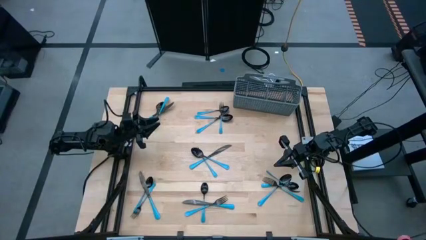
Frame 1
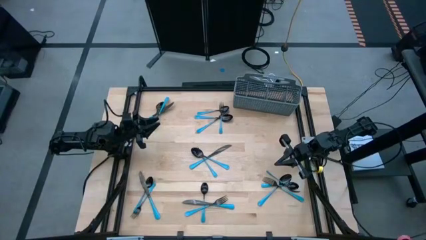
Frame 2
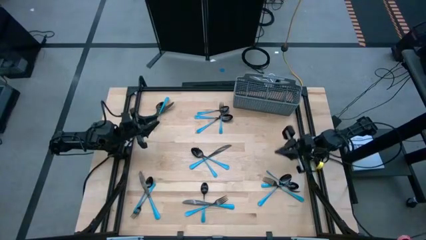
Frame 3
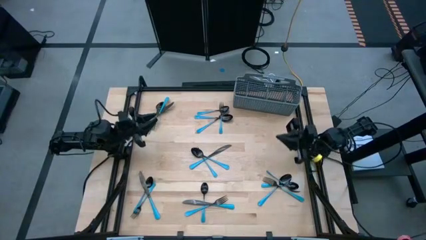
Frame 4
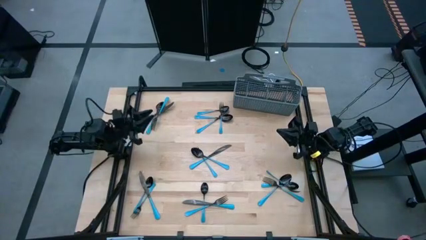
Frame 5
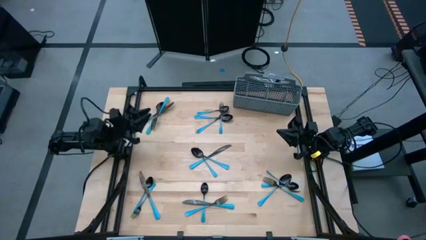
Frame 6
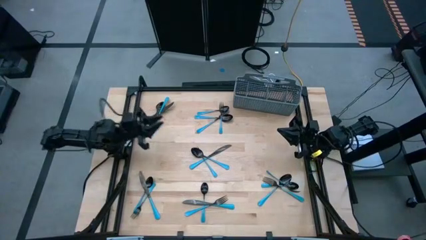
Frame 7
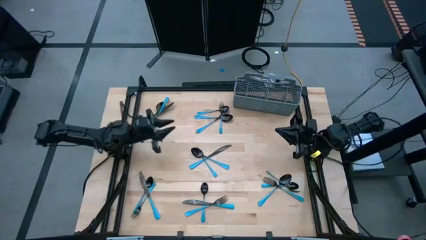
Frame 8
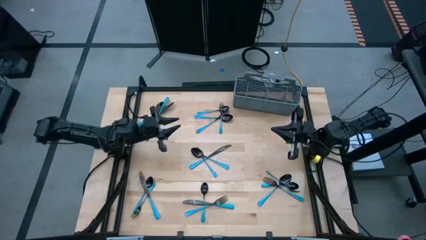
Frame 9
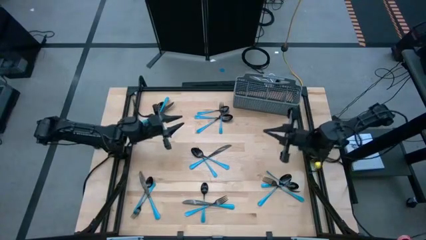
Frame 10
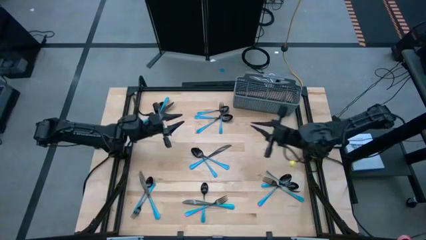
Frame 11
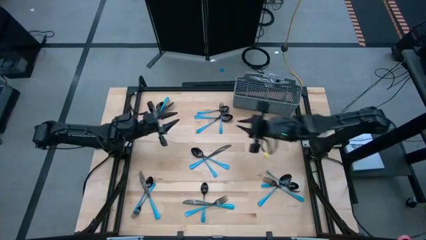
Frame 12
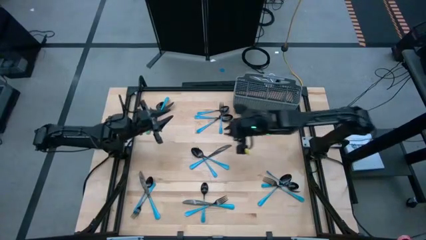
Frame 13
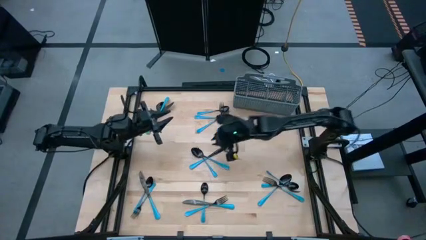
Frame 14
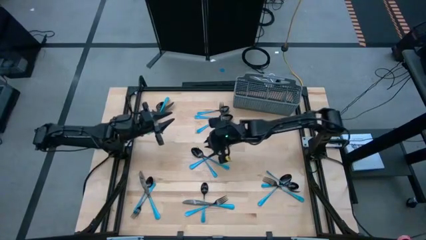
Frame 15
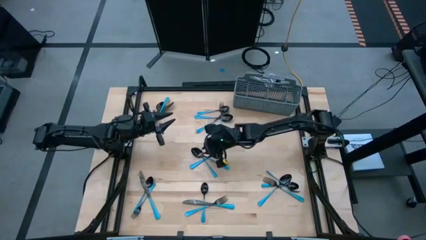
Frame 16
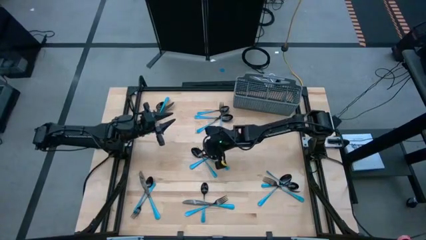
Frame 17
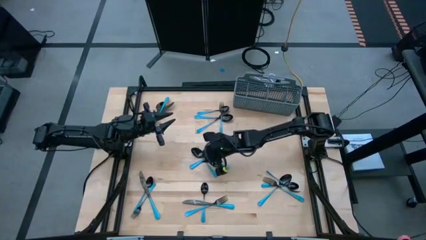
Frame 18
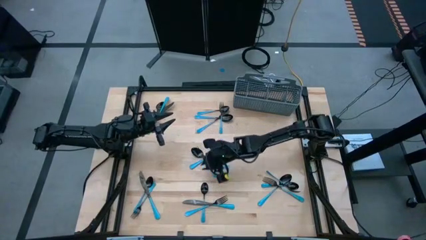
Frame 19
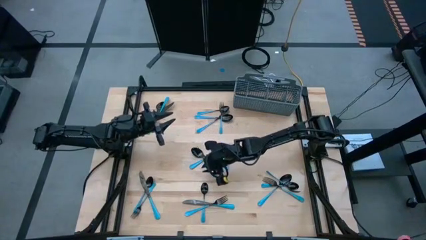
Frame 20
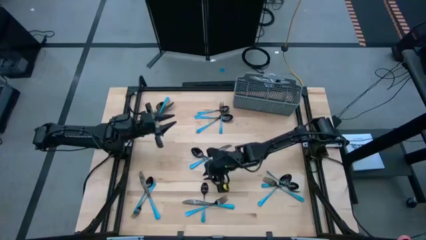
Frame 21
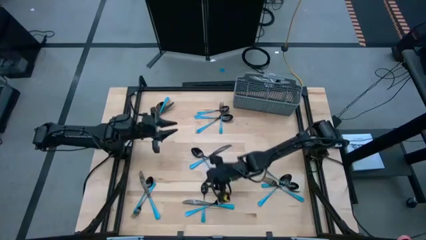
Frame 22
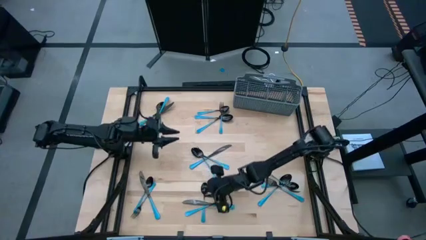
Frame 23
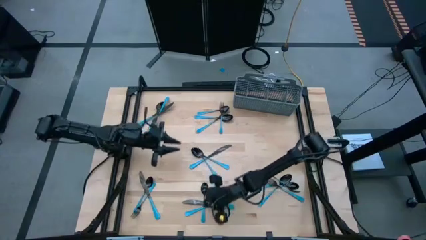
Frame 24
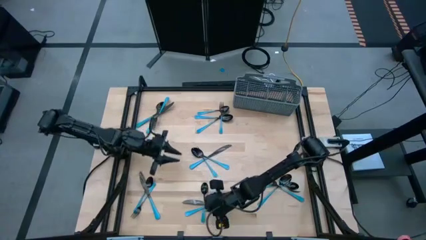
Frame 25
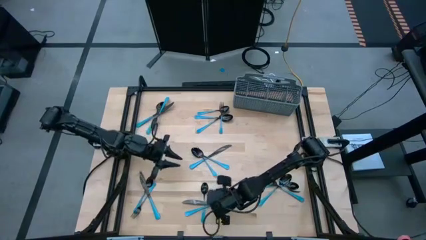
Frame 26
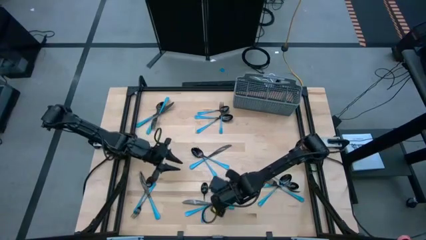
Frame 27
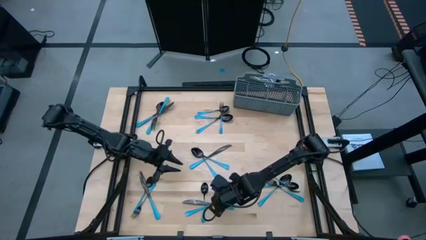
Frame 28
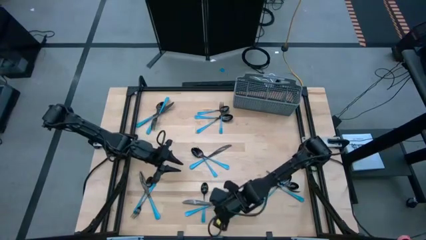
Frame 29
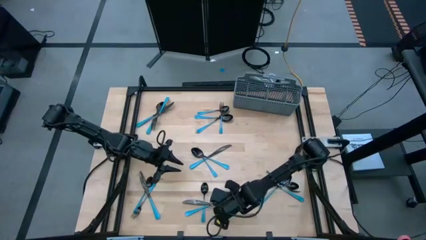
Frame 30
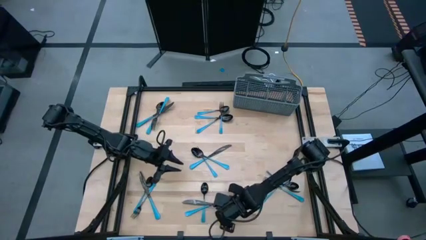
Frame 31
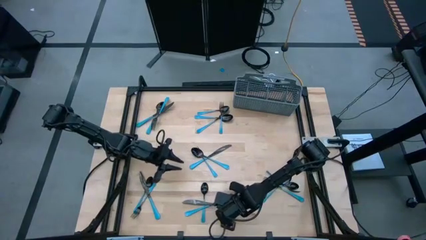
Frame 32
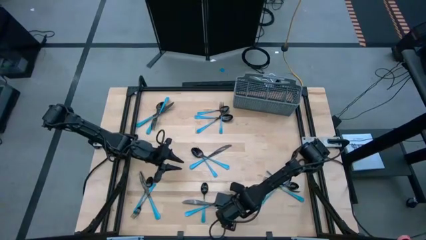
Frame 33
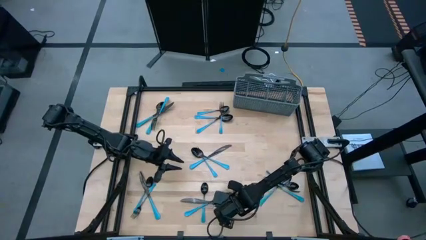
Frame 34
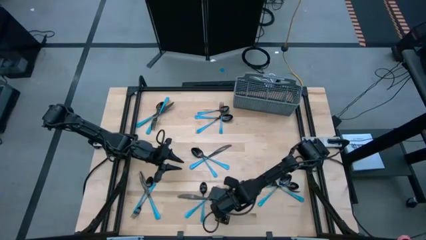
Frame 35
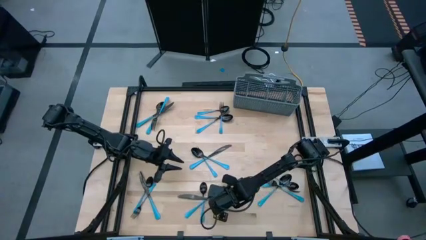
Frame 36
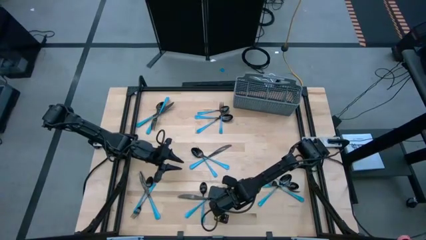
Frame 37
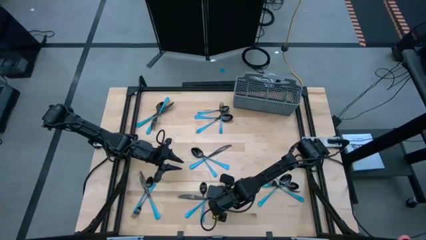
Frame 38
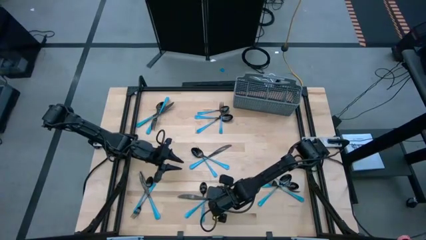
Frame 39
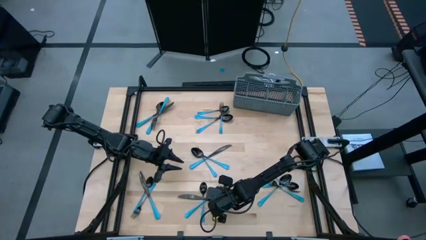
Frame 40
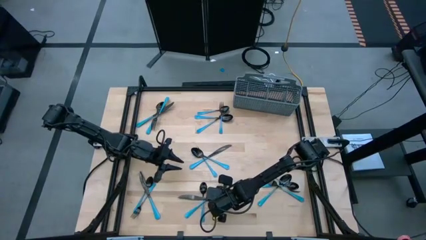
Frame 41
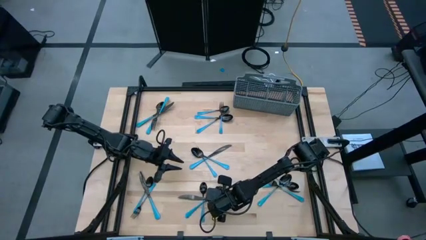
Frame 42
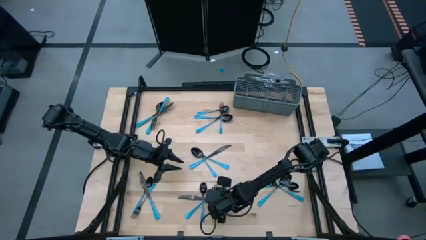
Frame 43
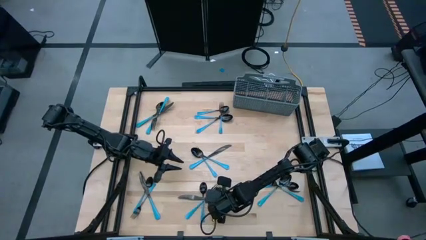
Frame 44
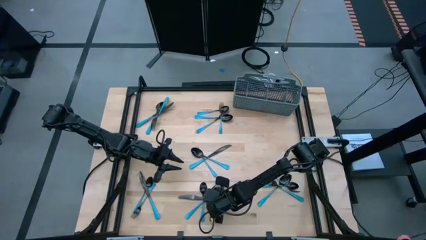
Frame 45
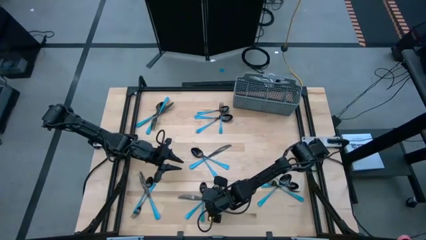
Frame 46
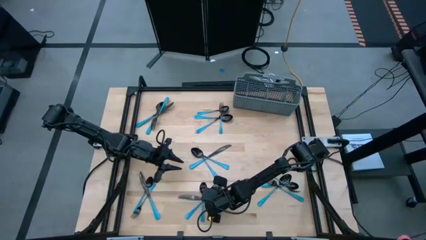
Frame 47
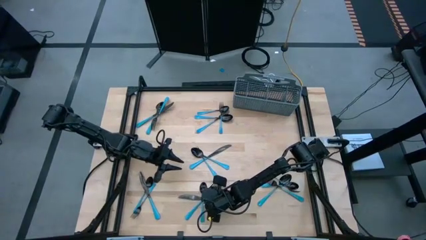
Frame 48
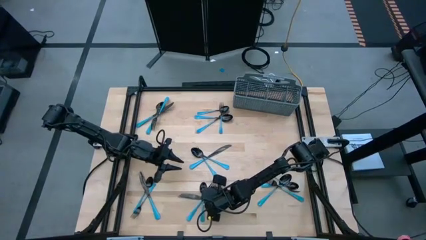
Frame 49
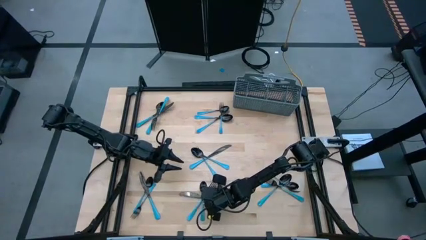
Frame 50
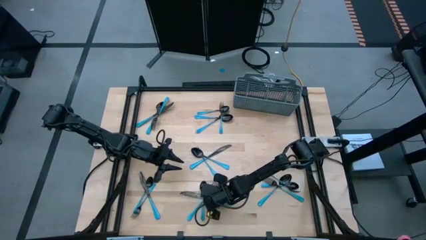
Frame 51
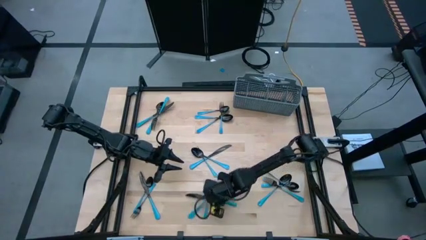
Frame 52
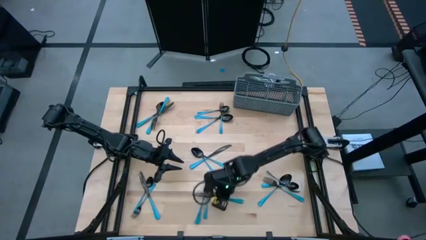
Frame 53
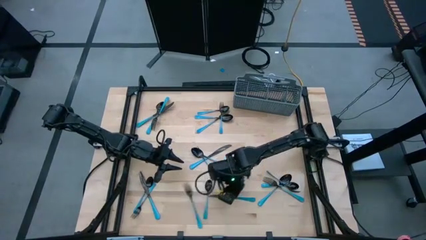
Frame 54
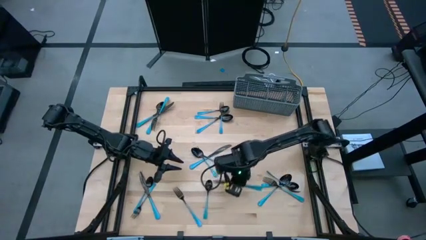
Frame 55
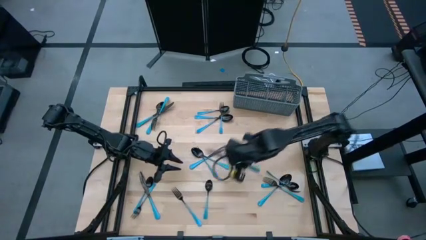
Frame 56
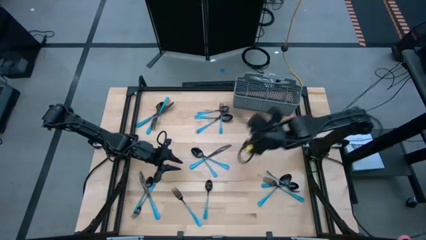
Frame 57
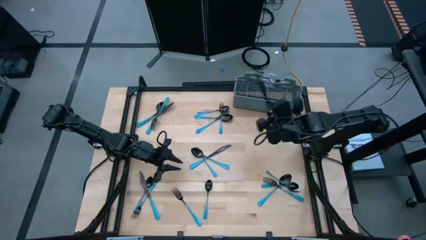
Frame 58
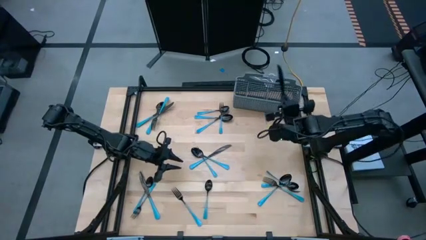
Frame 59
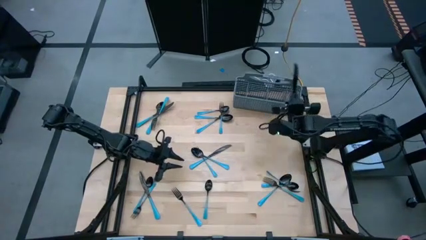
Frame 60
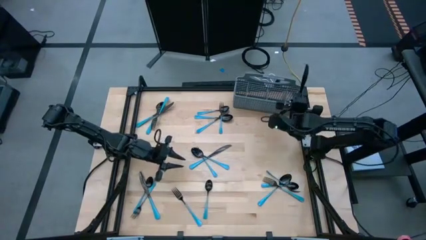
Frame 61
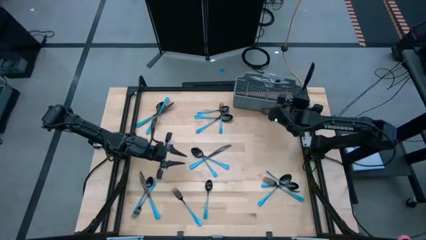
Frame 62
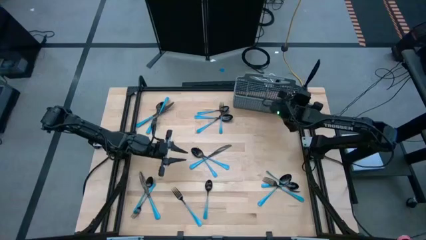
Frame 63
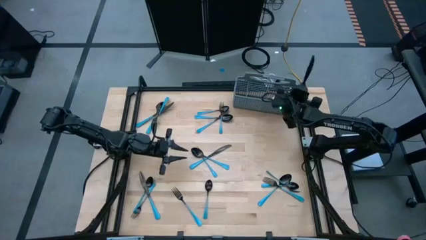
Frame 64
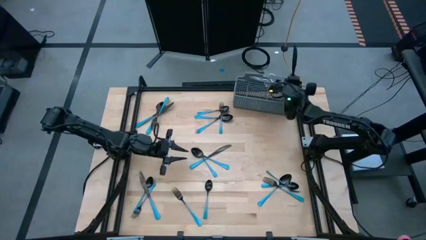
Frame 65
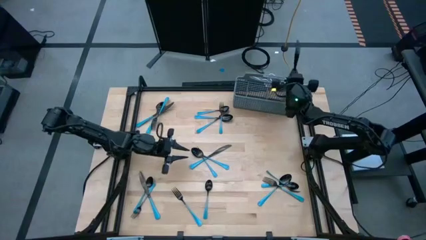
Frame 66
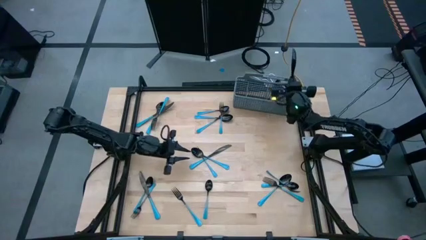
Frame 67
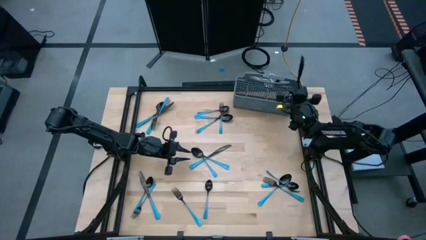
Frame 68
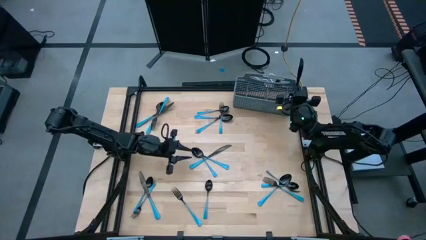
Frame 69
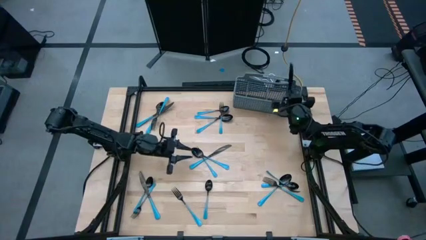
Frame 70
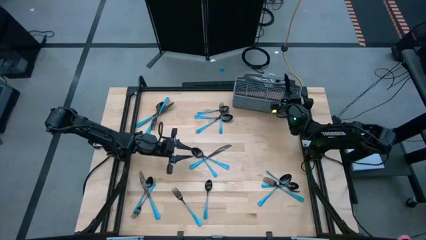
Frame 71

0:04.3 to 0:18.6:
Task: Sort silverware
Put the blue knife into the right of the blue utensil organizer
